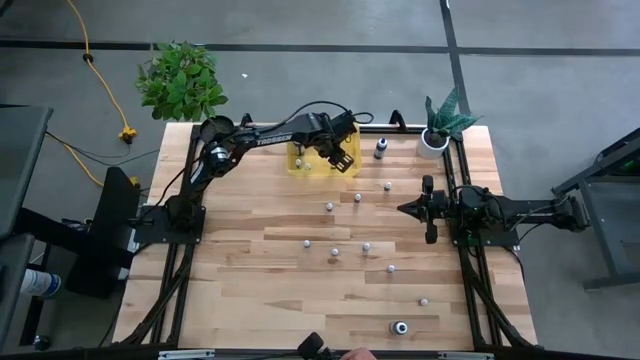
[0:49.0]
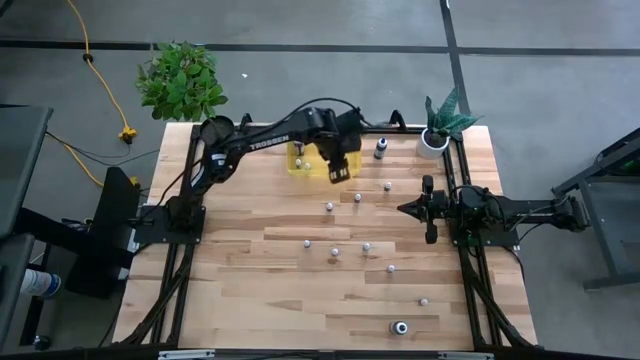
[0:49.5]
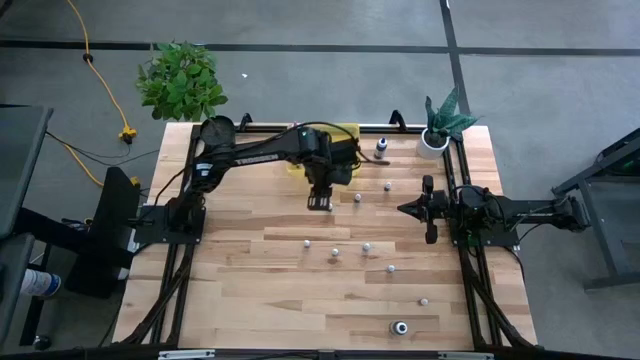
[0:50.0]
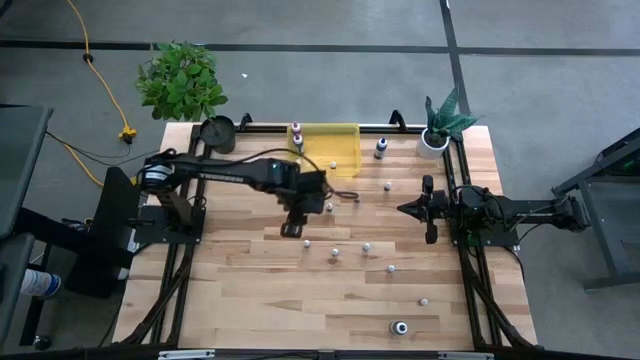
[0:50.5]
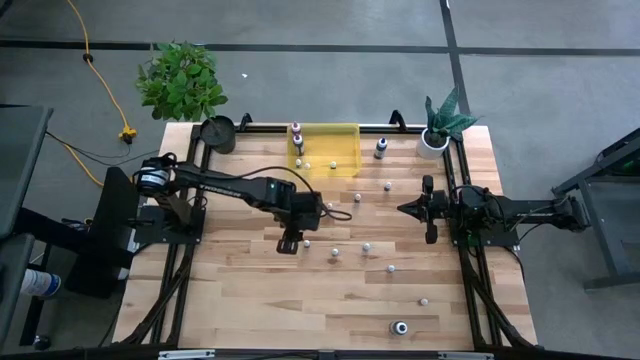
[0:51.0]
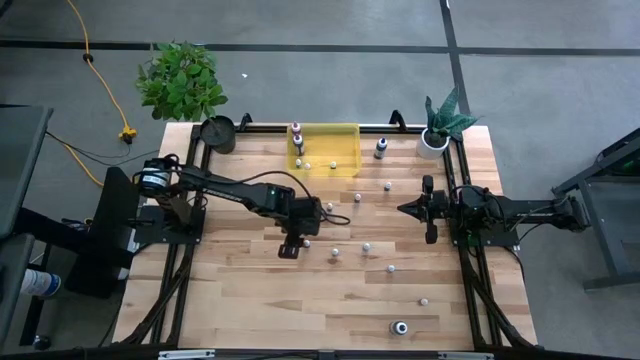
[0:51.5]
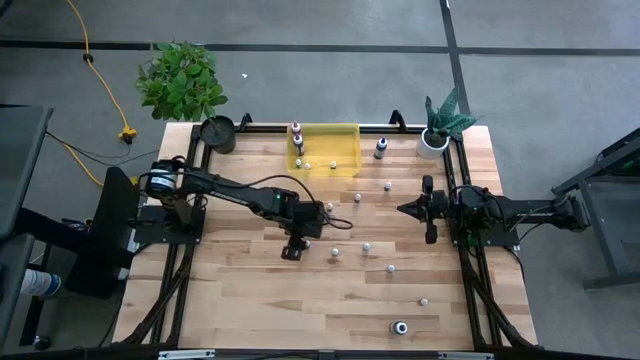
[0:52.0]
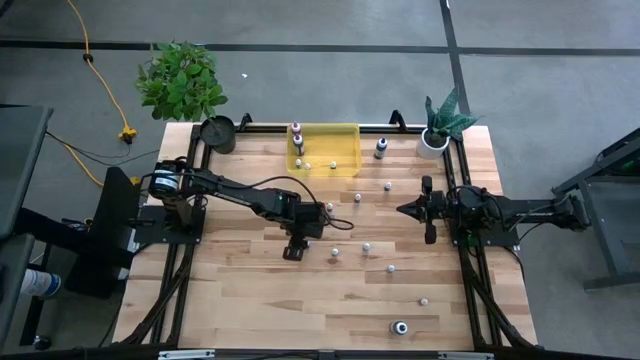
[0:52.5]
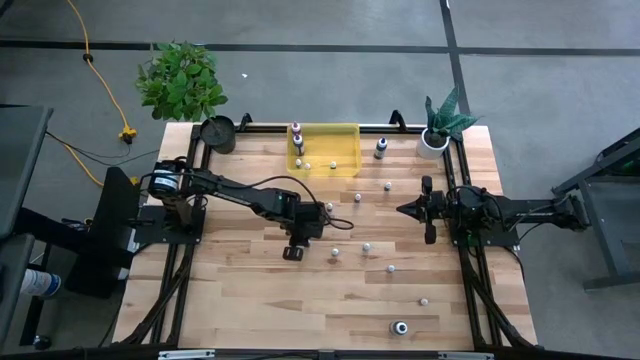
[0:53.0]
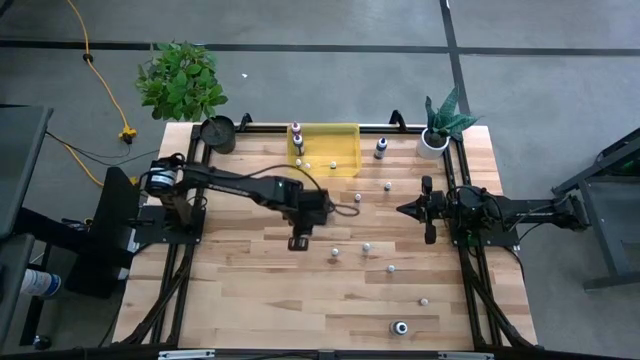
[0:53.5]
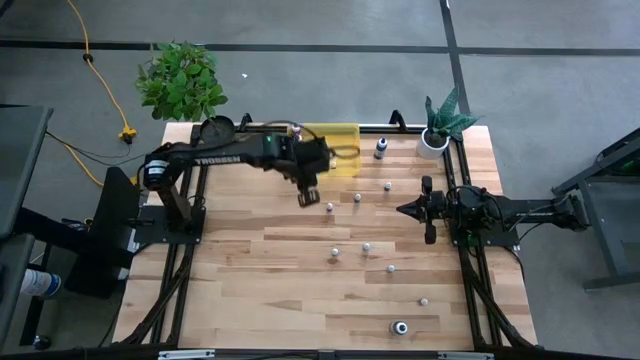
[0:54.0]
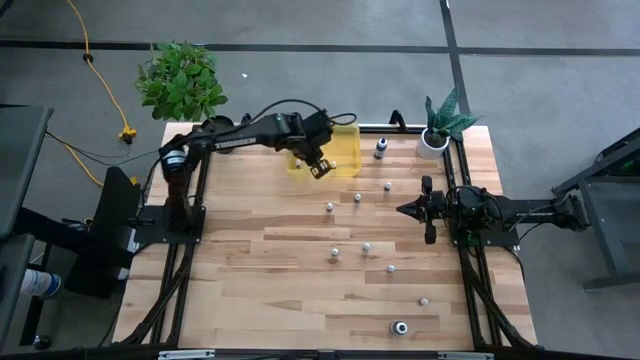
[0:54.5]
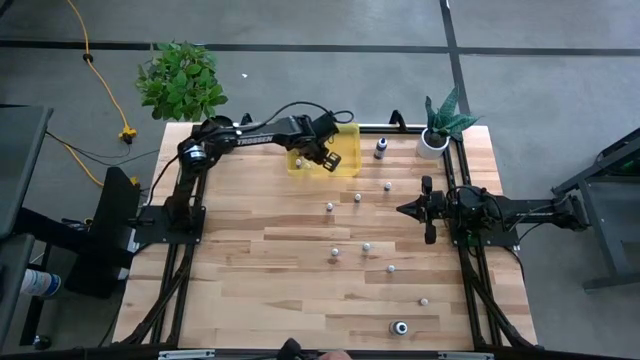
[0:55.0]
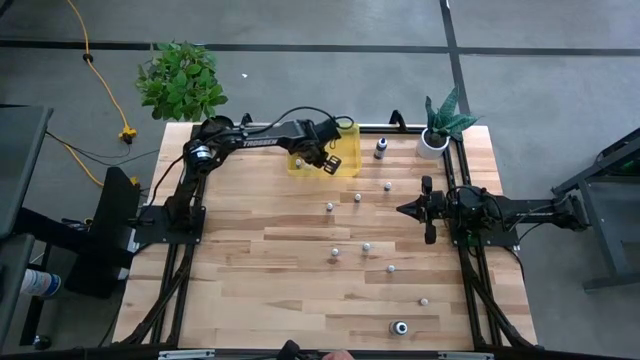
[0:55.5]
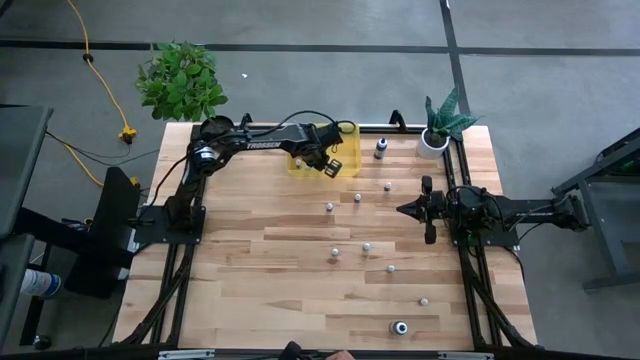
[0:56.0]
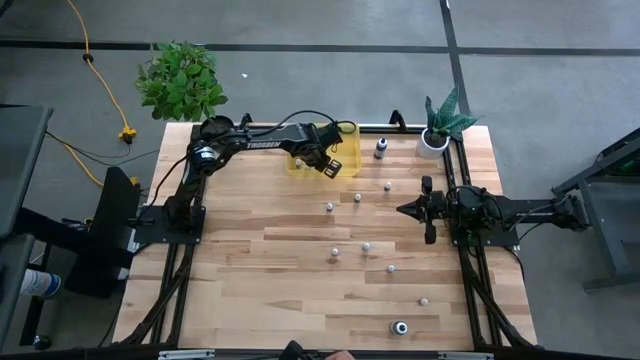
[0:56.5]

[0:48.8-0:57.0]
Task: Pick & Place food coloring
Put the top small red food coloring bottle into the yellow container

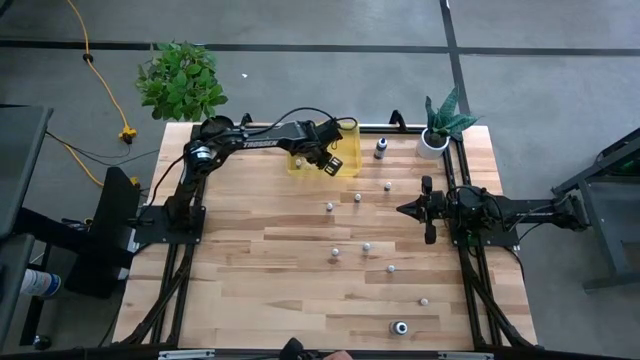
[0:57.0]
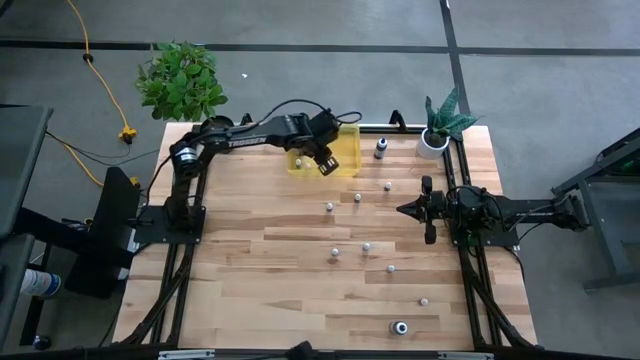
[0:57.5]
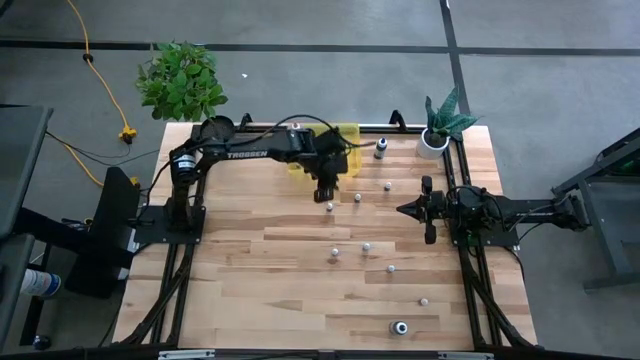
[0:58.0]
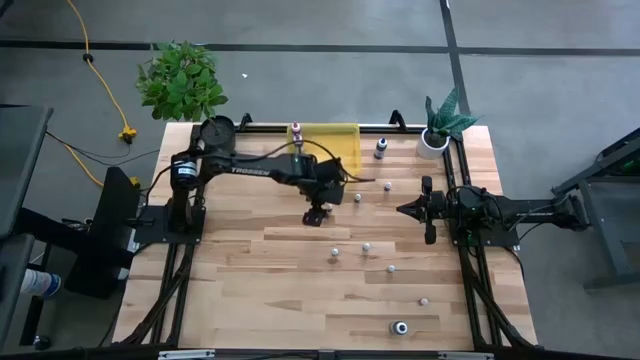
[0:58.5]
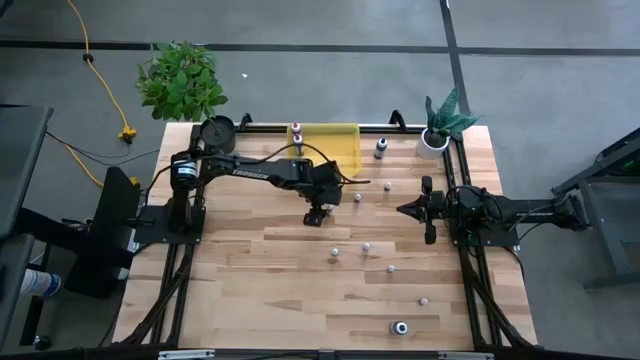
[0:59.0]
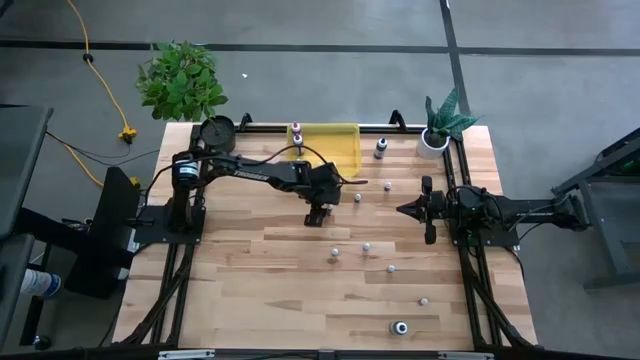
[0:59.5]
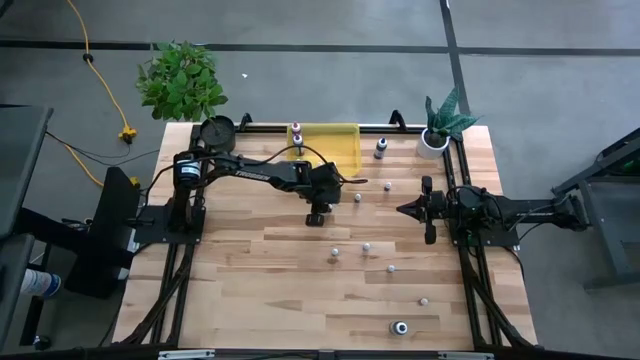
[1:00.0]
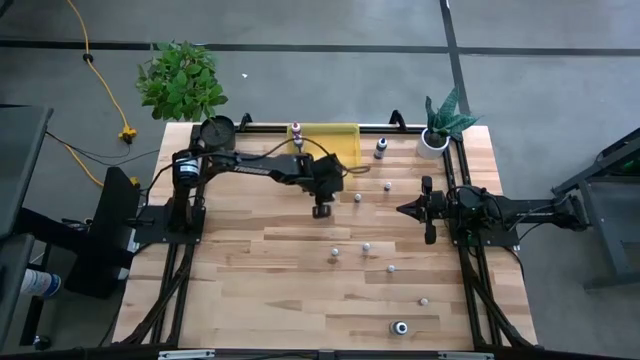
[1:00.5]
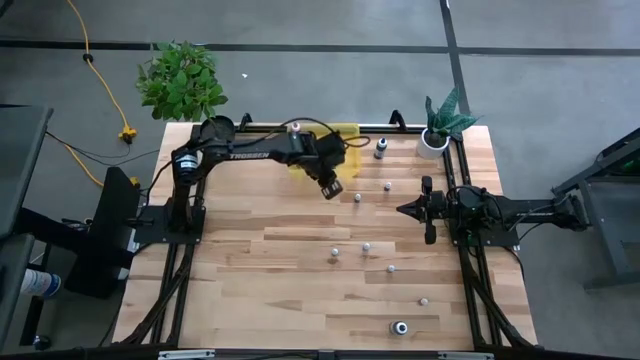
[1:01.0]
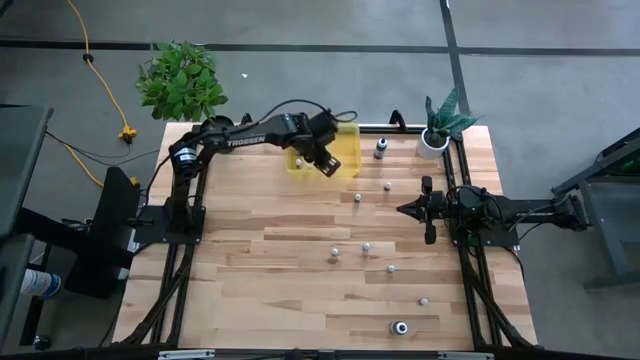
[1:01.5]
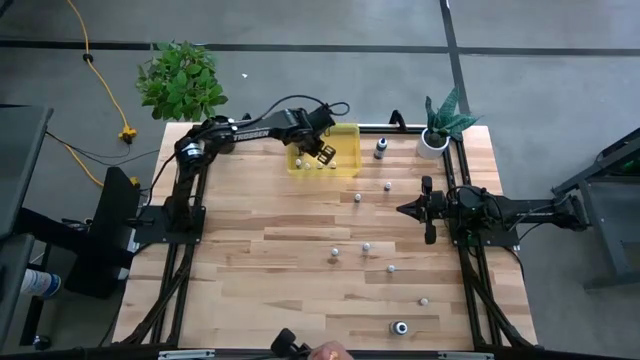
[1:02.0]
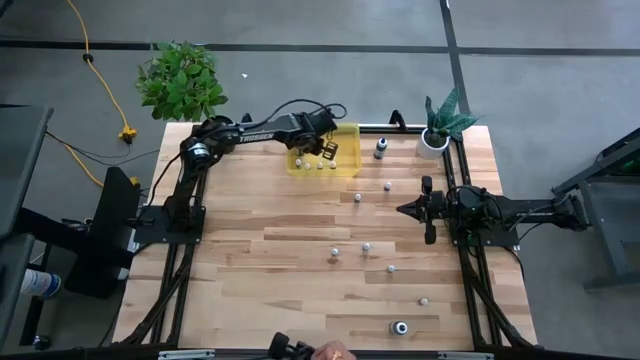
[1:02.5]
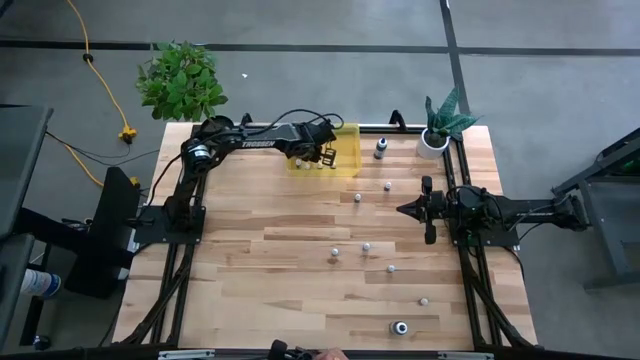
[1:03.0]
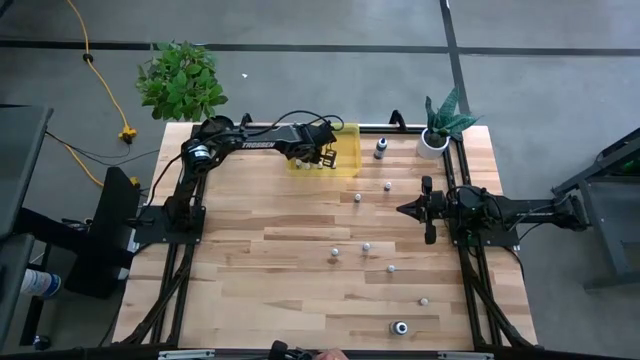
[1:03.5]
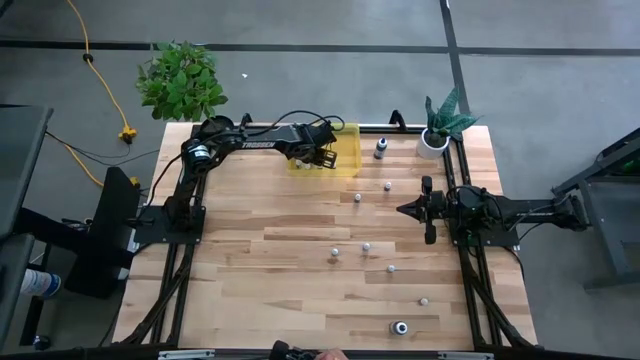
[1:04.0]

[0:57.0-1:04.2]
Put the top small violet food coloring bottle into the yellow container

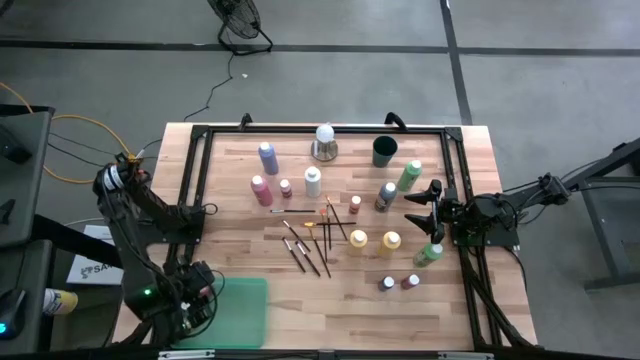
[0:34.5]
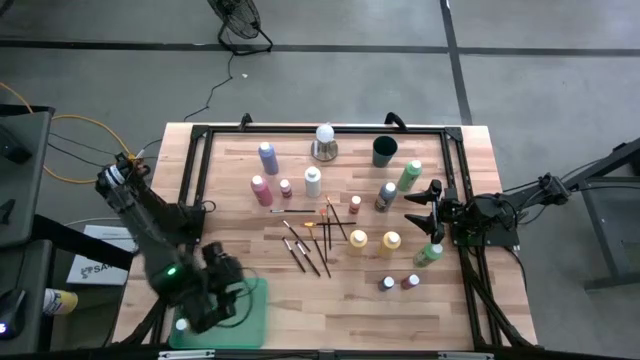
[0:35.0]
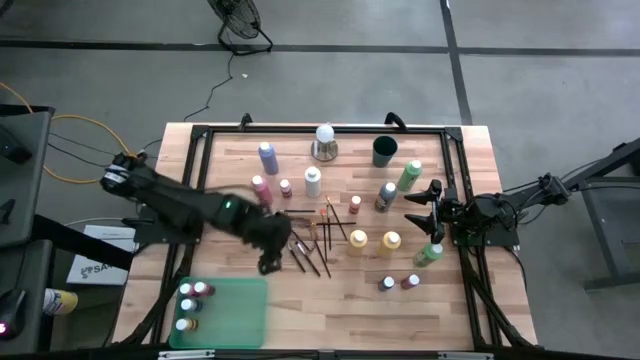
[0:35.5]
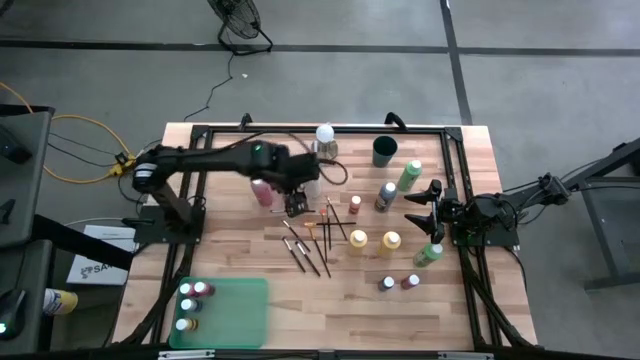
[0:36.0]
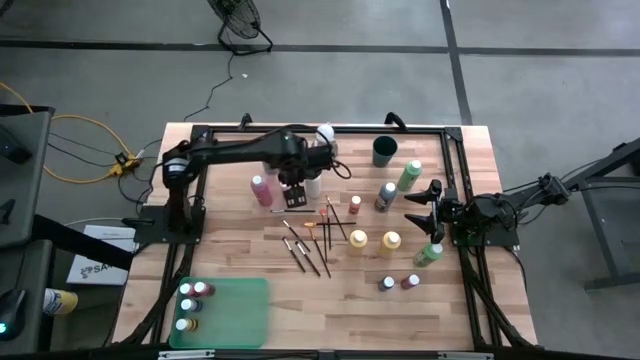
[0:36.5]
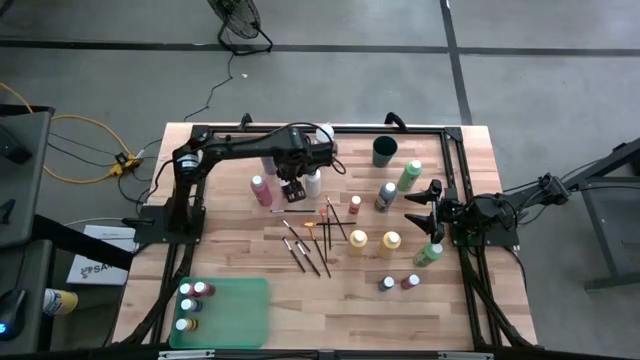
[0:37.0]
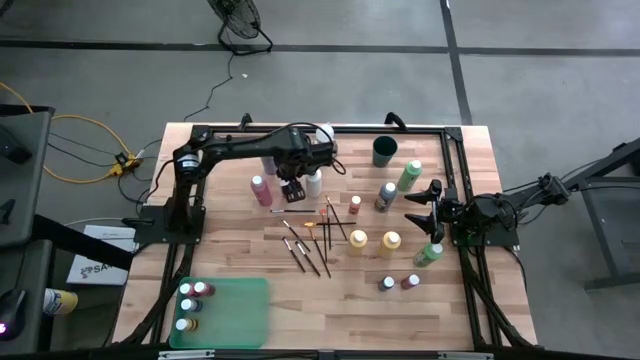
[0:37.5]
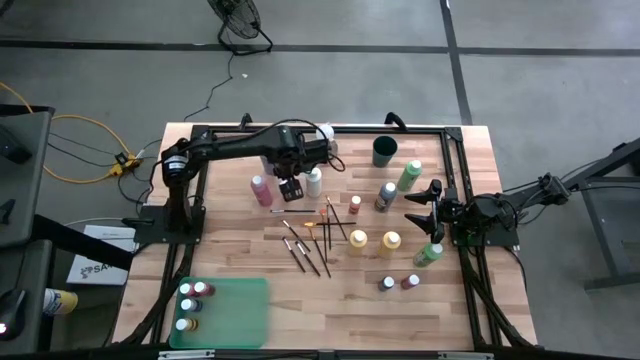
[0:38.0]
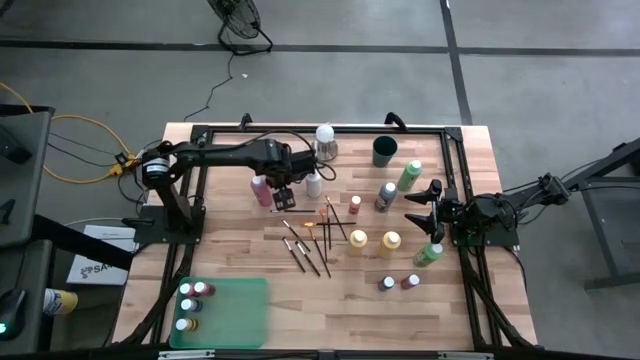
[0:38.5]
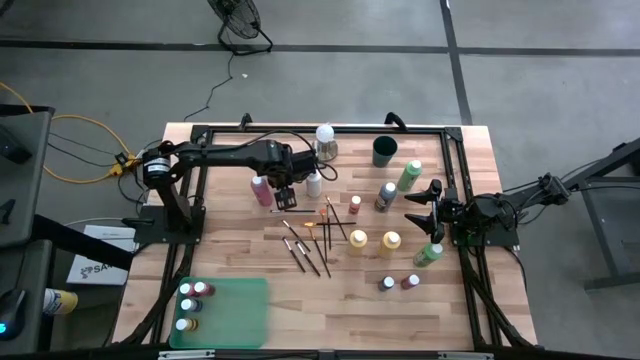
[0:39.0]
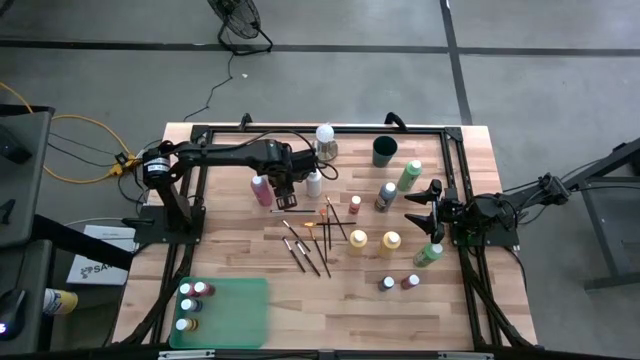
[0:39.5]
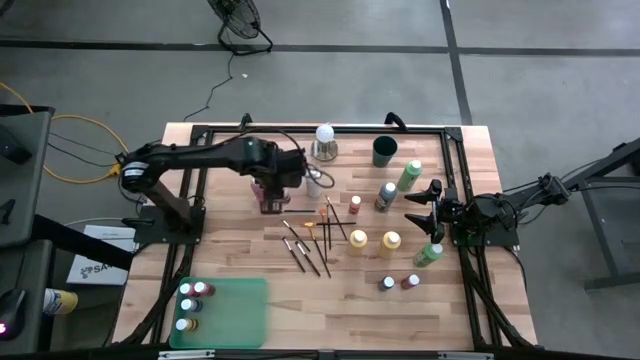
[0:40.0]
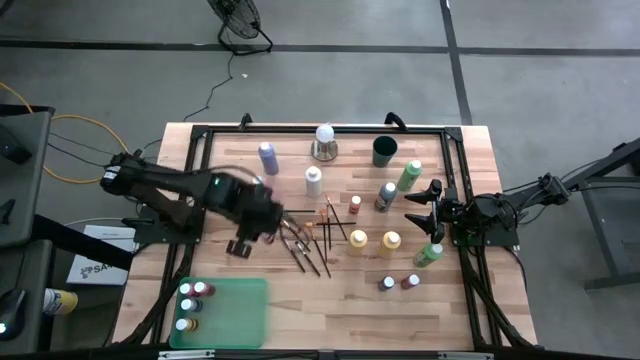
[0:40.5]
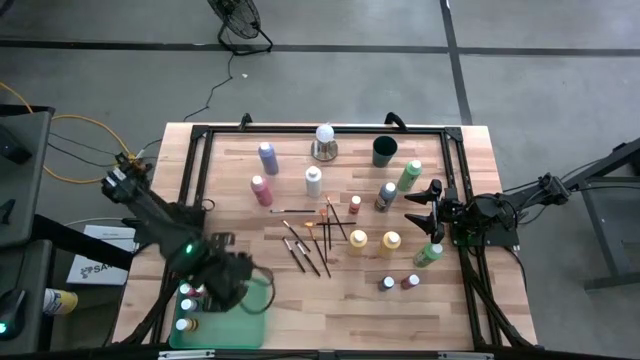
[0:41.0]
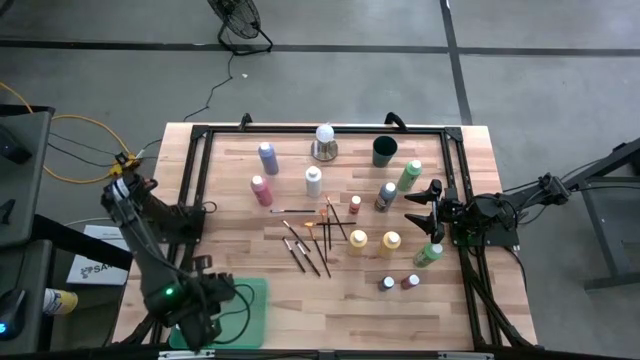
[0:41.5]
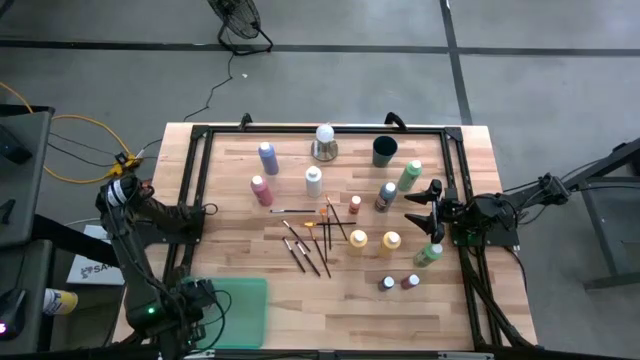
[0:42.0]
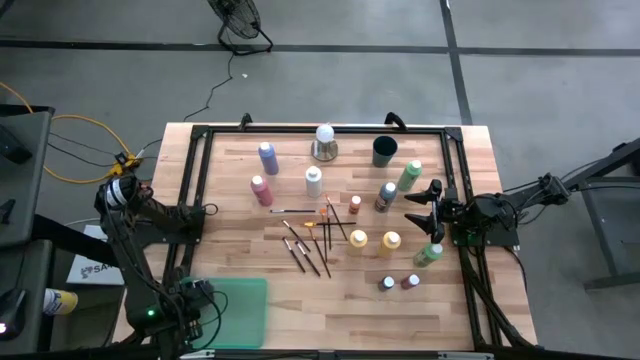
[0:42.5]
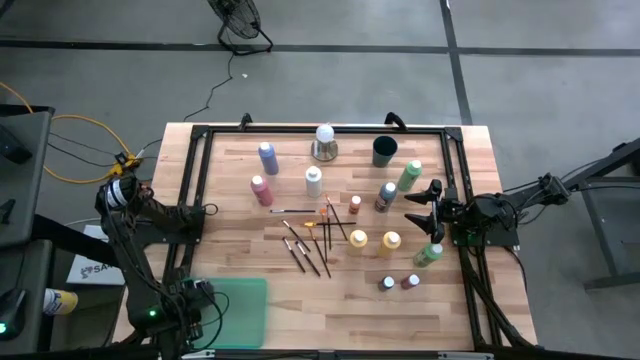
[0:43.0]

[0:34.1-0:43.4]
Task: Pick & Place Paint Supplies
Put the pink paint bottle into the green bin
